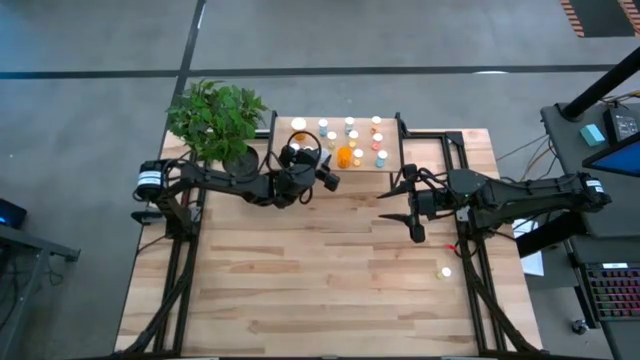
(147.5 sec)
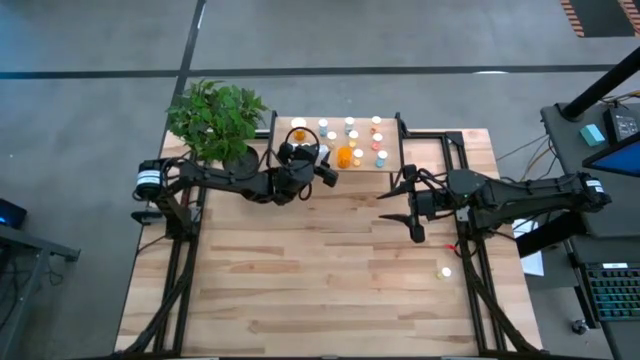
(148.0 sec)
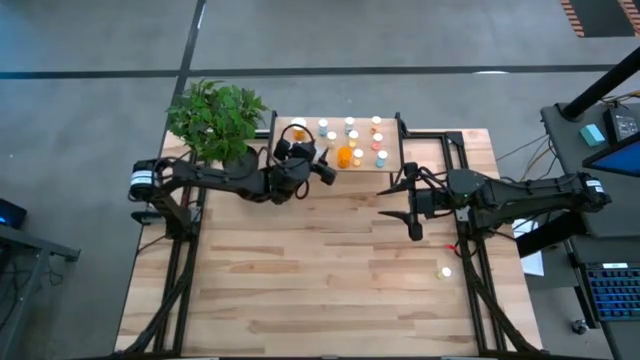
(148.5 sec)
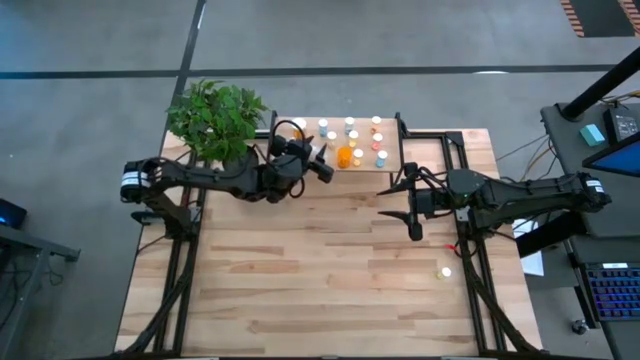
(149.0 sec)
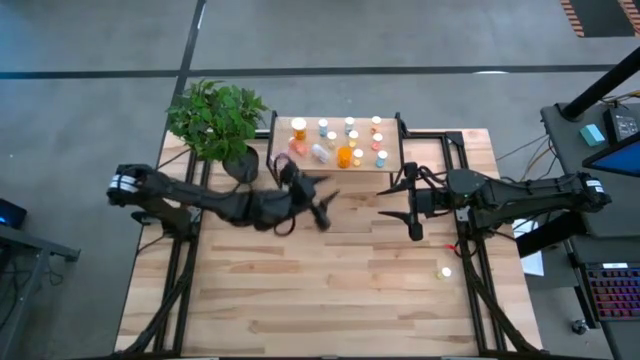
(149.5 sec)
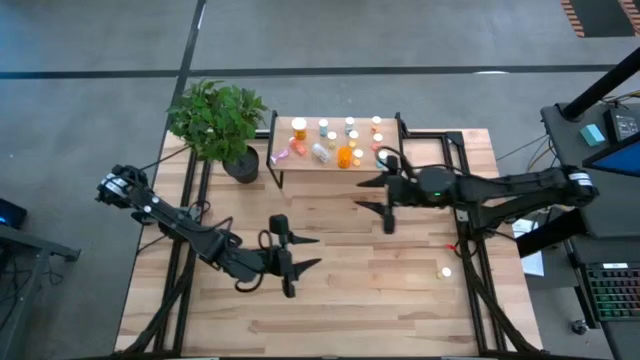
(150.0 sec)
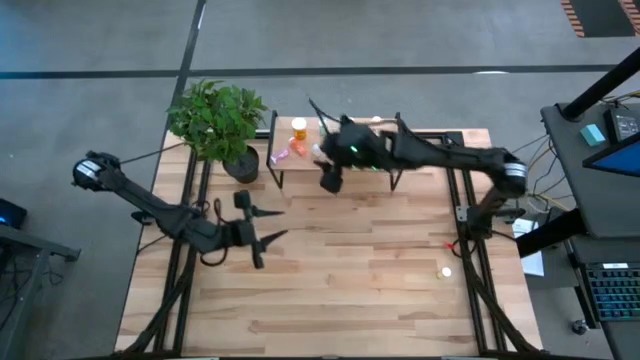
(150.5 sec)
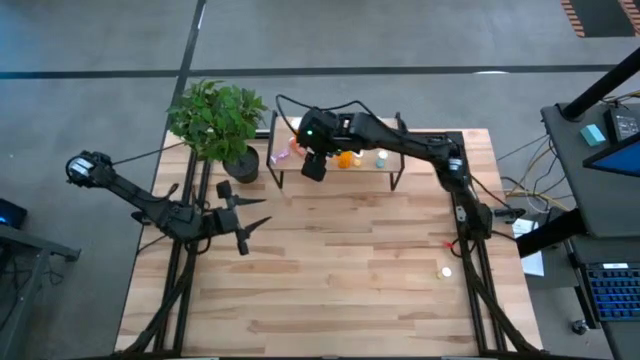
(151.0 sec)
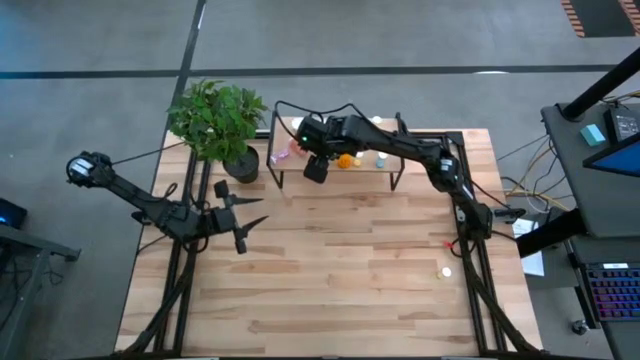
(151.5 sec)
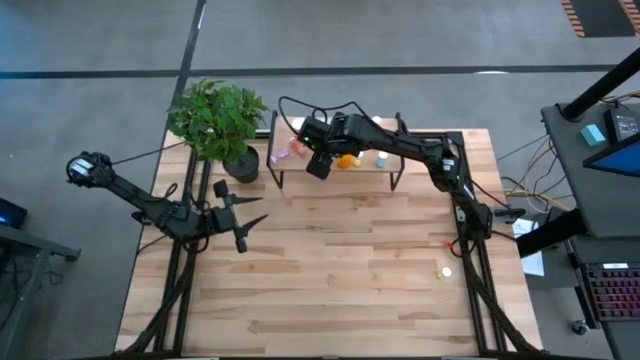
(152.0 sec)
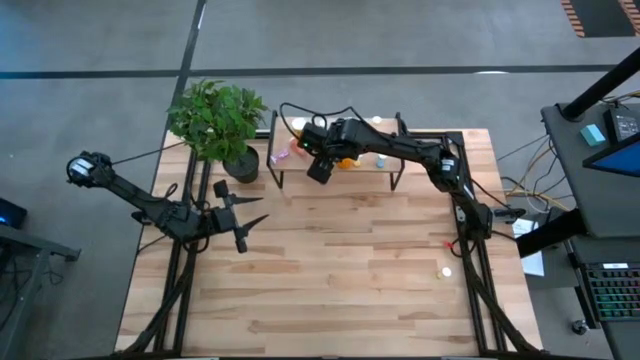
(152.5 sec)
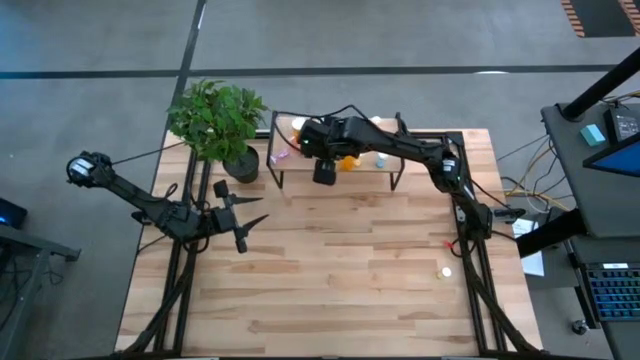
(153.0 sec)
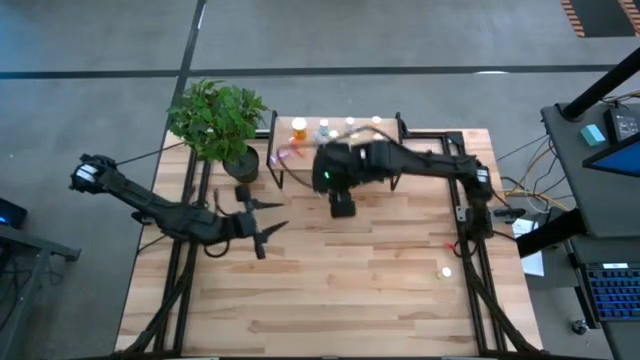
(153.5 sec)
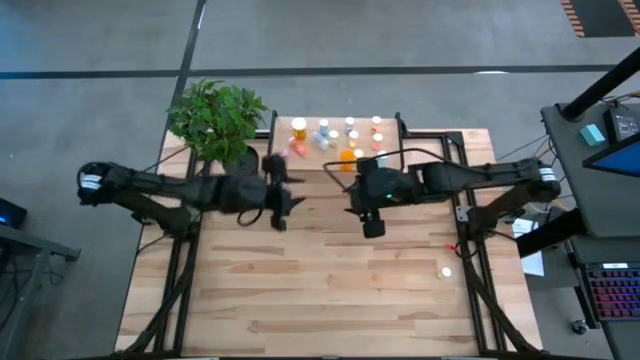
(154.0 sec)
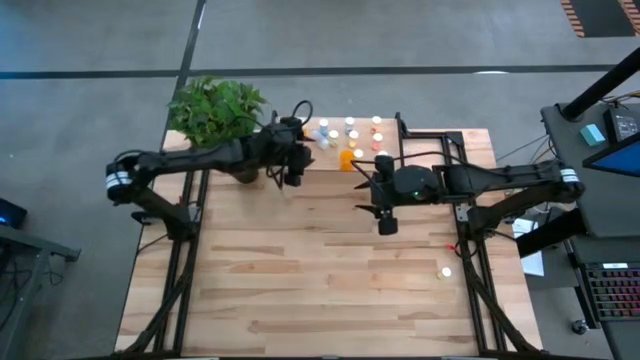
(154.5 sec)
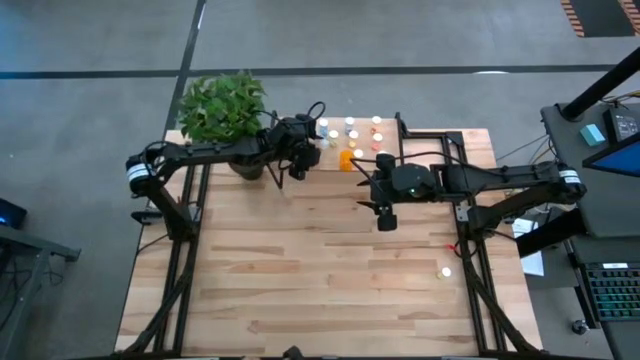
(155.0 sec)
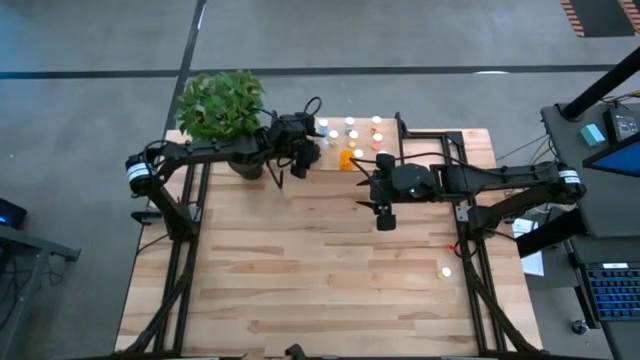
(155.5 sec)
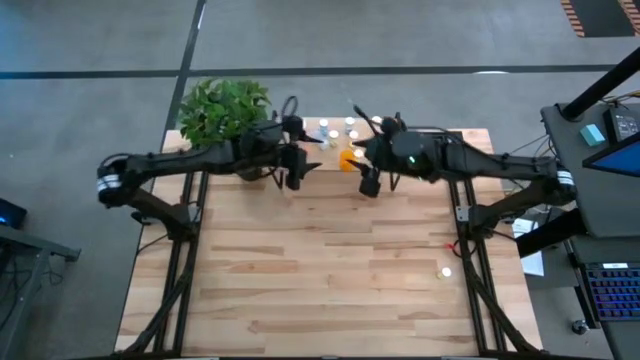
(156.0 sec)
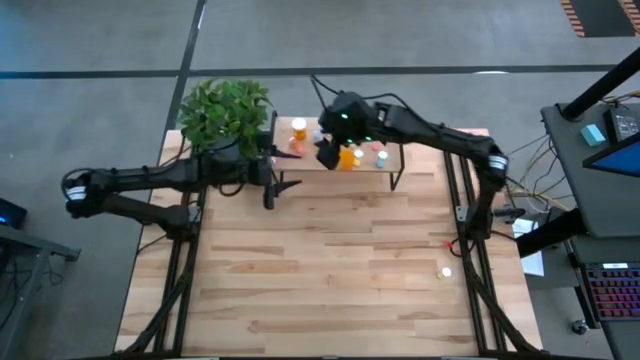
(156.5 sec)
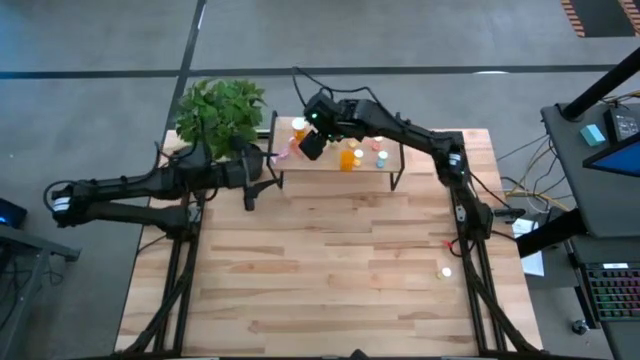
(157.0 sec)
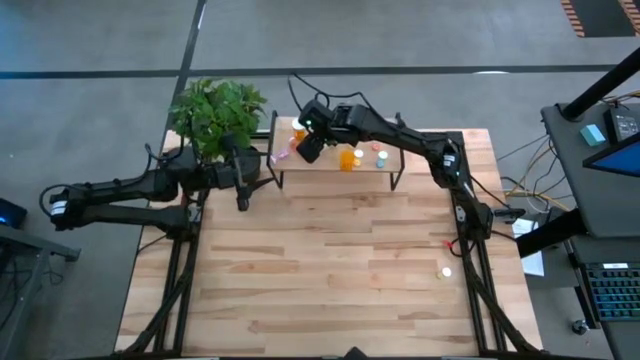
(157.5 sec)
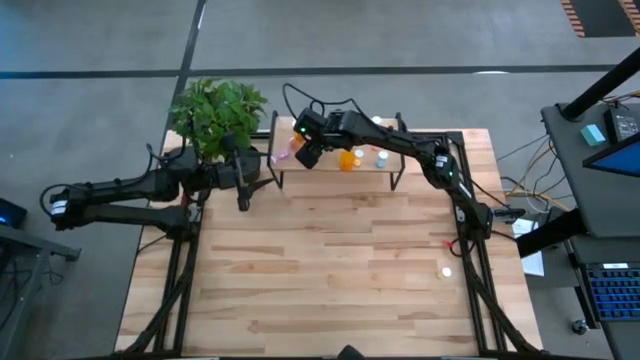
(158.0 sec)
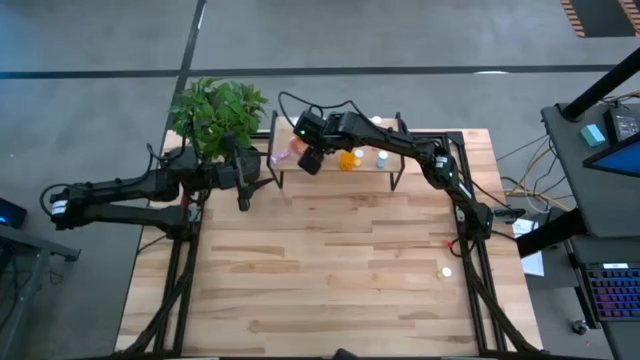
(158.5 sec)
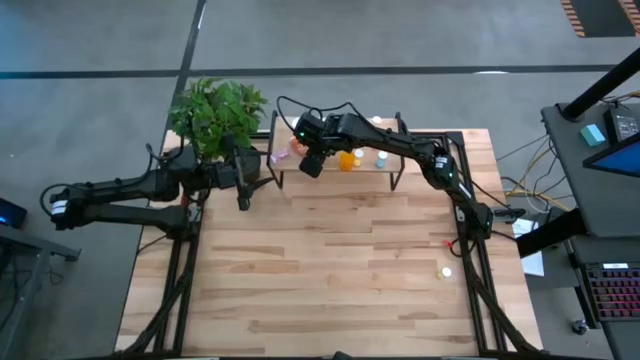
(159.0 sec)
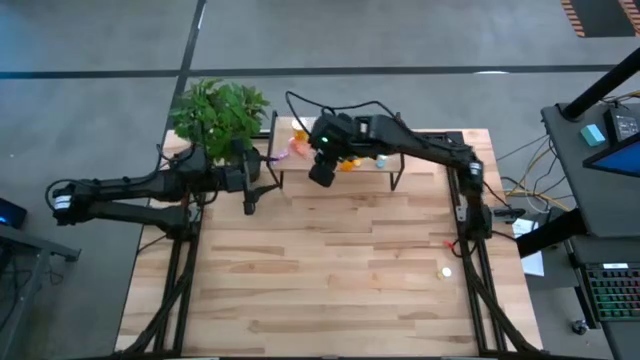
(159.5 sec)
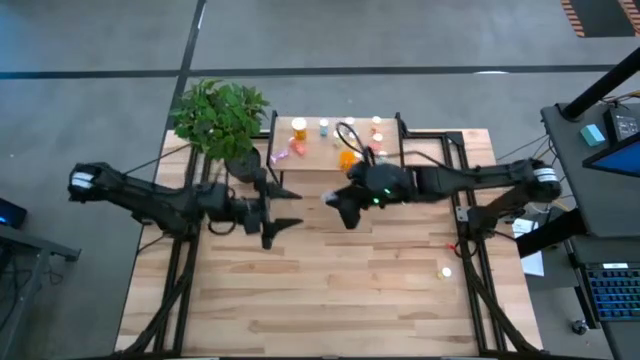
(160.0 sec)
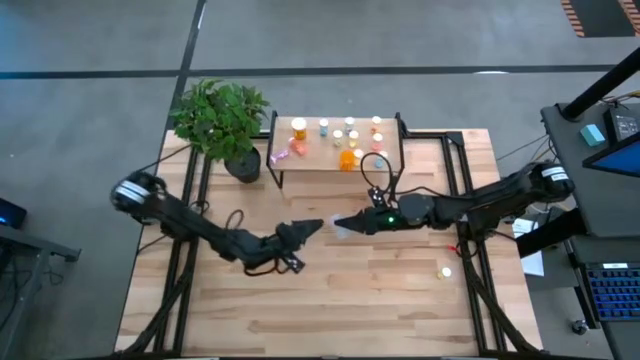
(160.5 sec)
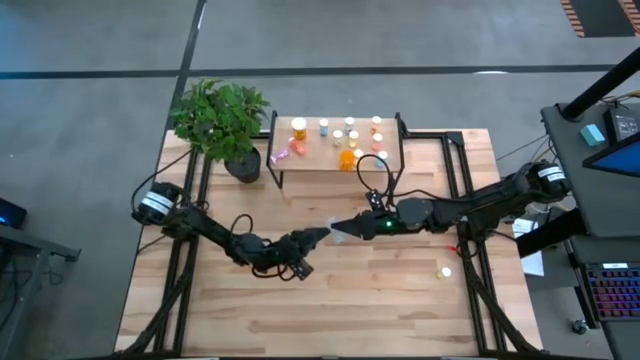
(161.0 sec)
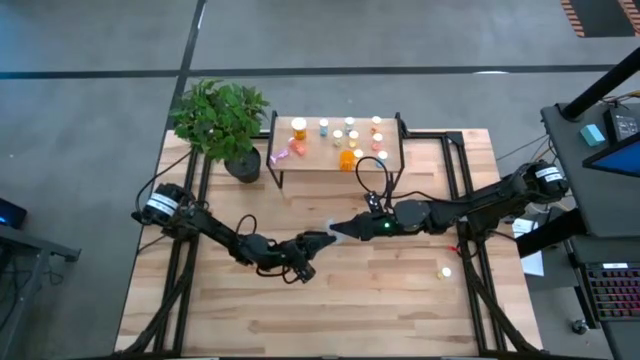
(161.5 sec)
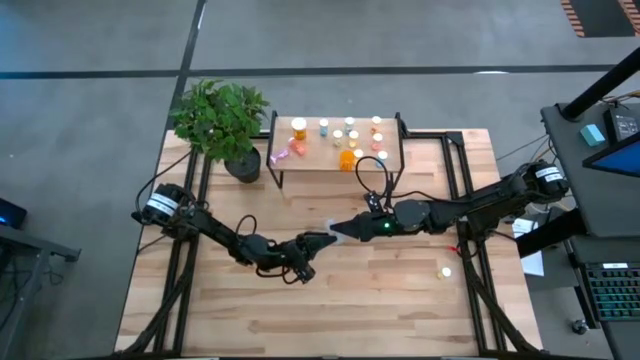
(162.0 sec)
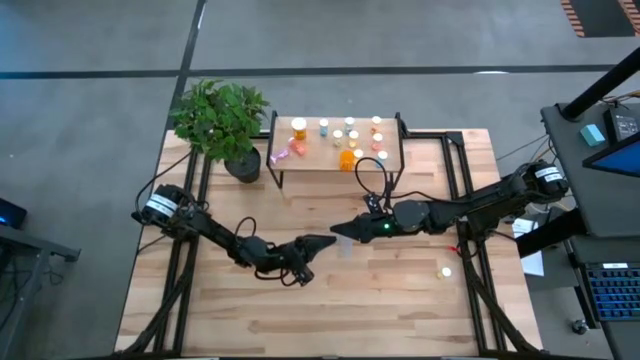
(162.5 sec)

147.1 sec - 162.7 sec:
Task: Pick and place medicine bottles onto shelf by color
Put the transparent pill bottle on the shelf

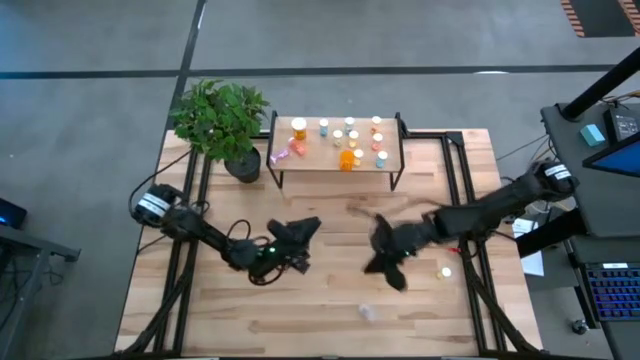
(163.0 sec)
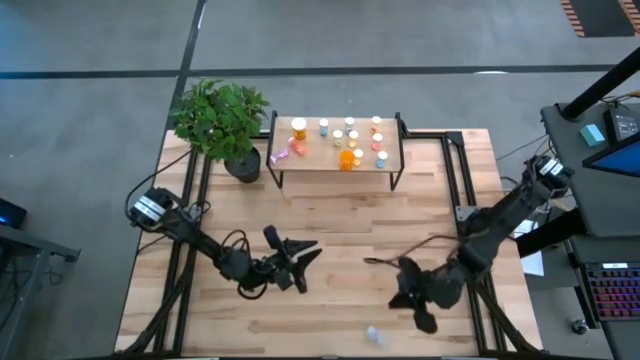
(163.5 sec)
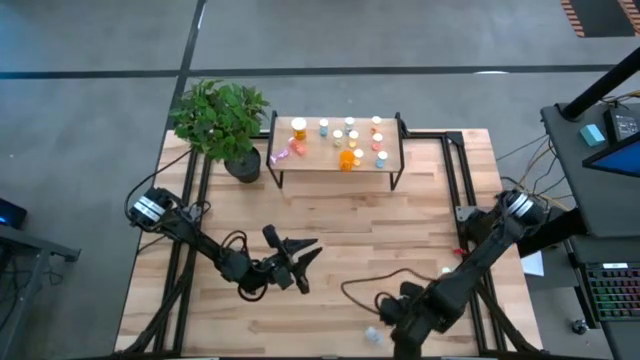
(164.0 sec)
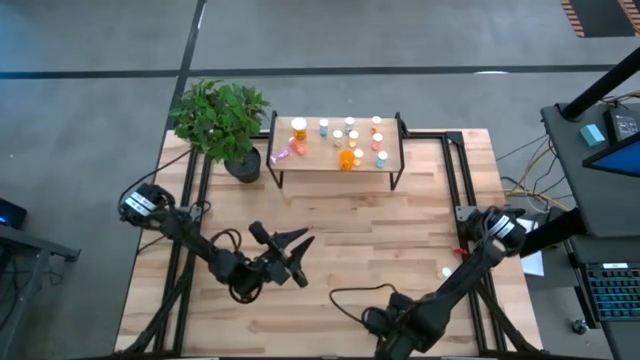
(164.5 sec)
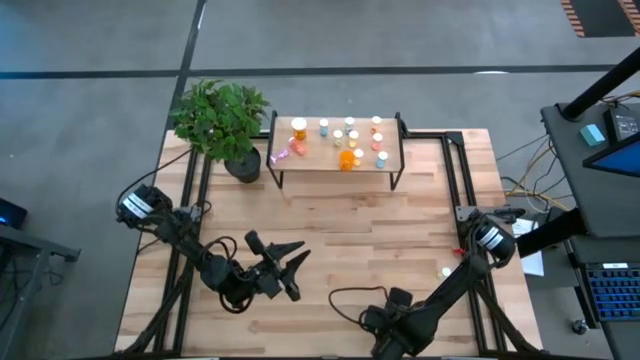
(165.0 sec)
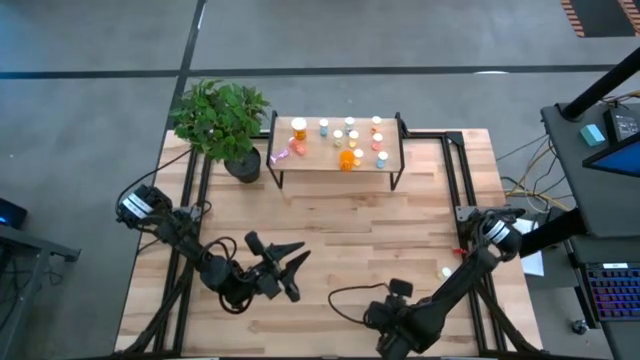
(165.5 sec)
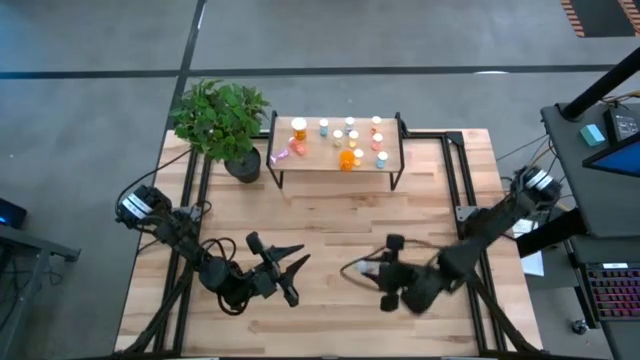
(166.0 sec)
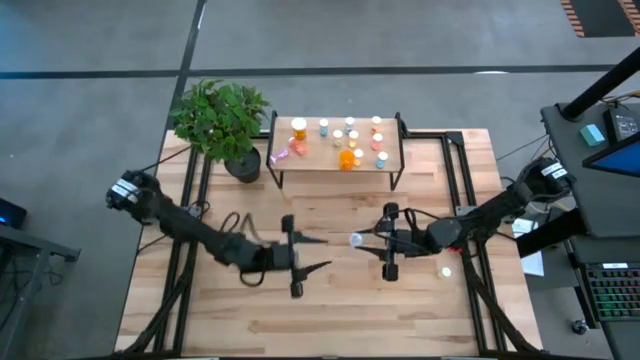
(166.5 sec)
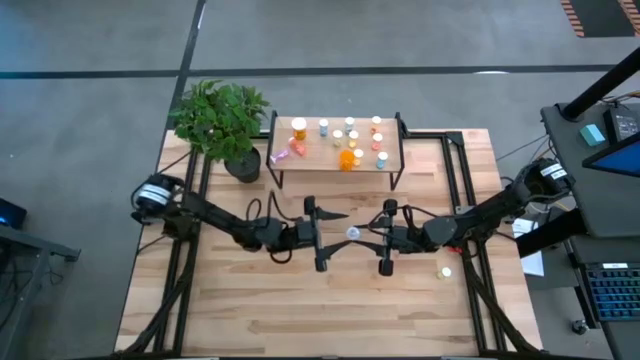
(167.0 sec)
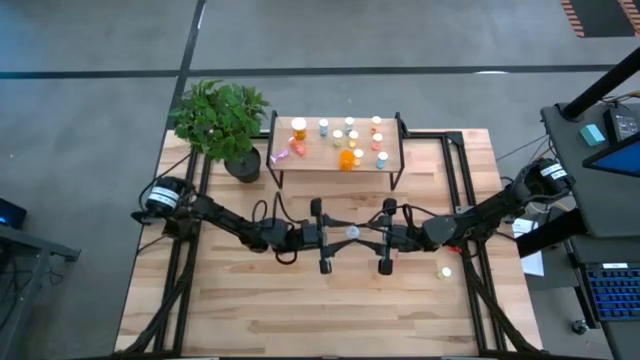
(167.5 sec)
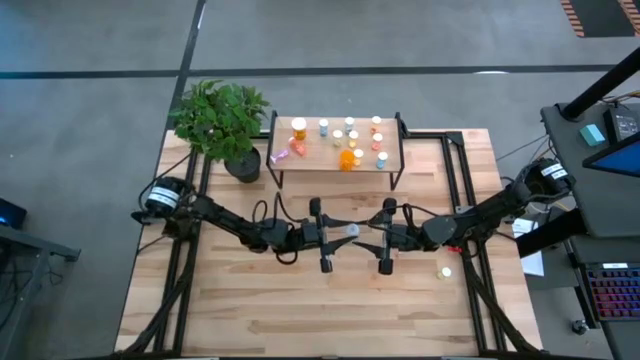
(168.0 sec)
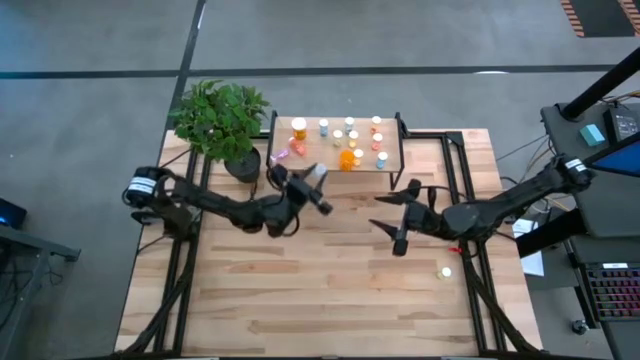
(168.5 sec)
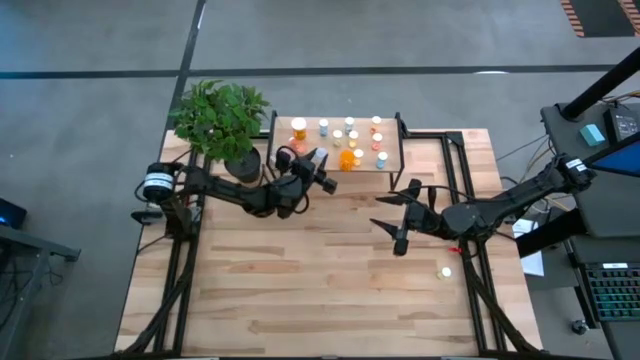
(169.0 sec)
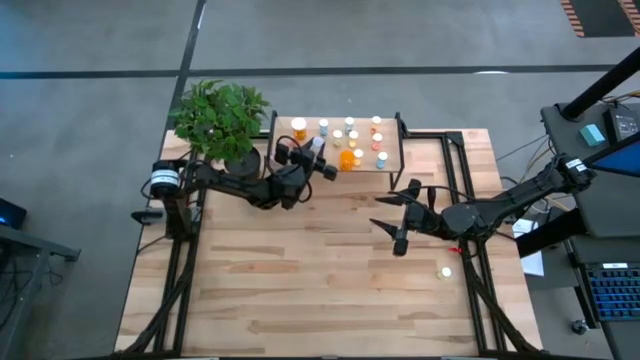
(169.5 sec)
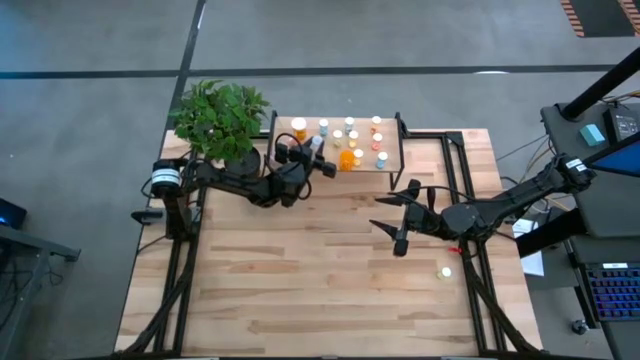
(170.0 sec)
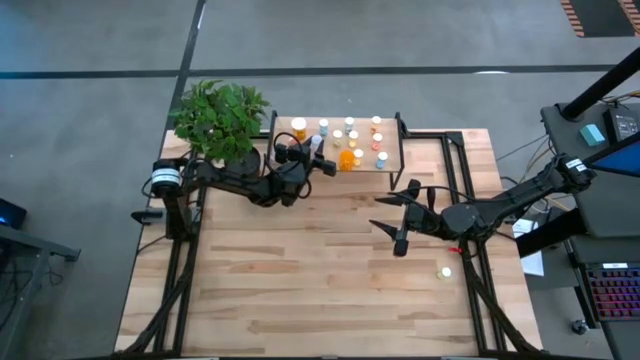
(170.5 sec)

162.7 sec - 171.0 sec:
Put the transparent pill bottle on the shelf
